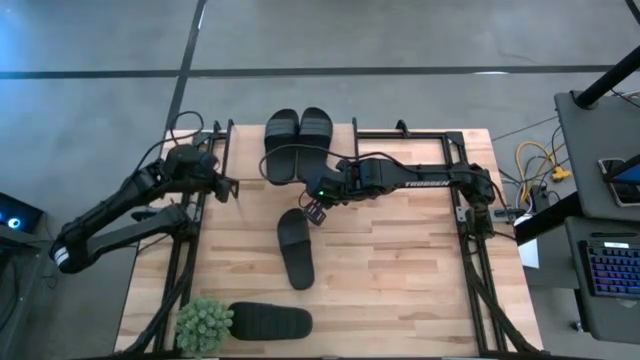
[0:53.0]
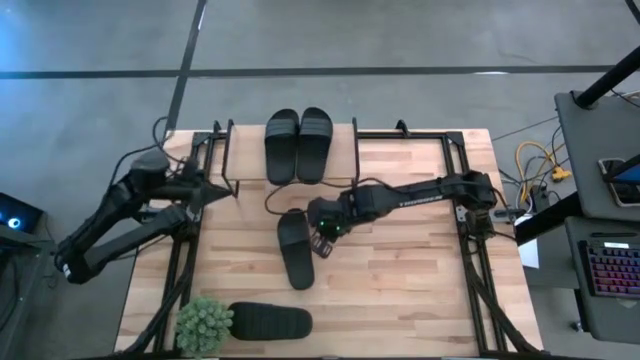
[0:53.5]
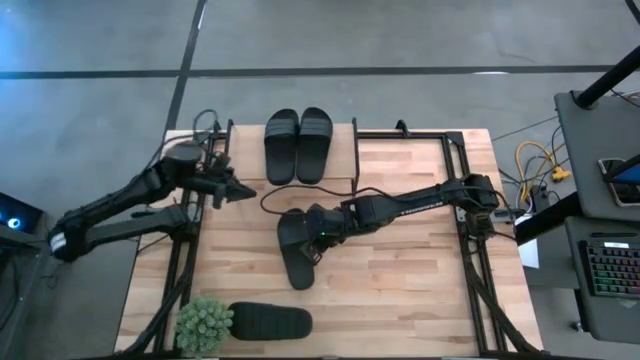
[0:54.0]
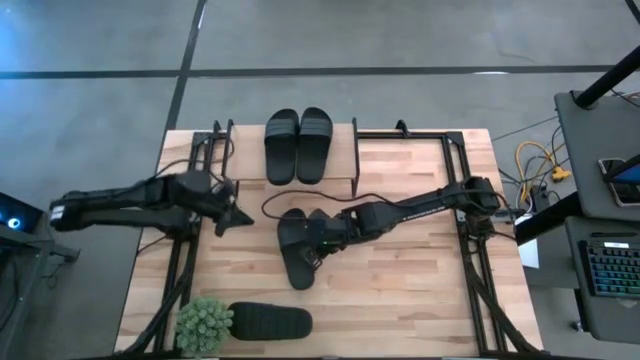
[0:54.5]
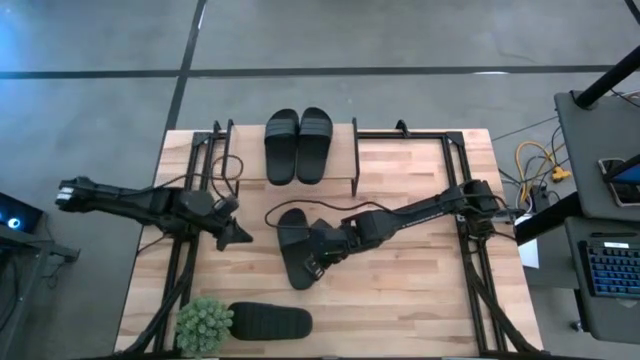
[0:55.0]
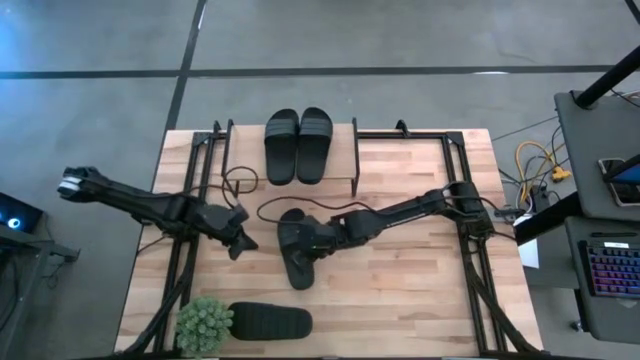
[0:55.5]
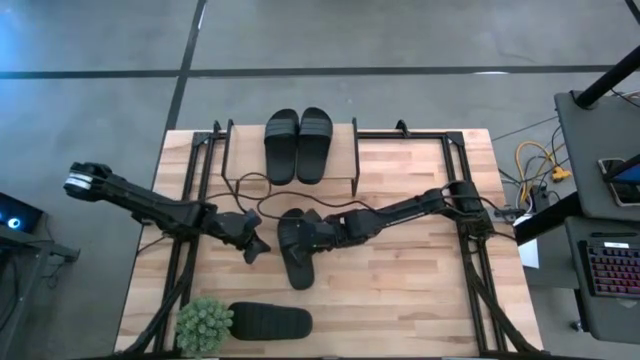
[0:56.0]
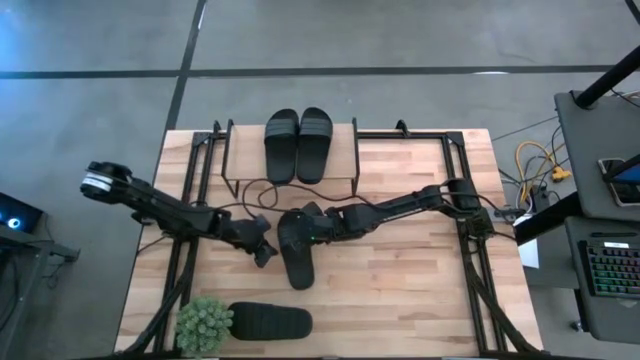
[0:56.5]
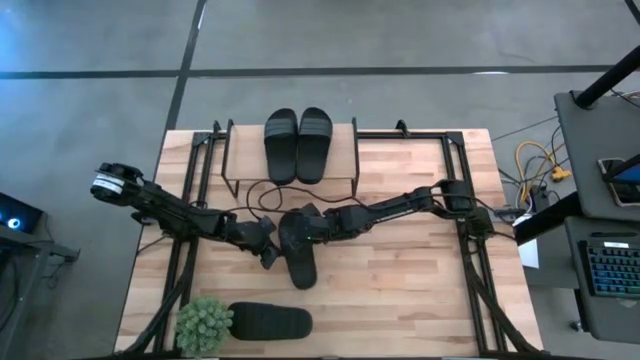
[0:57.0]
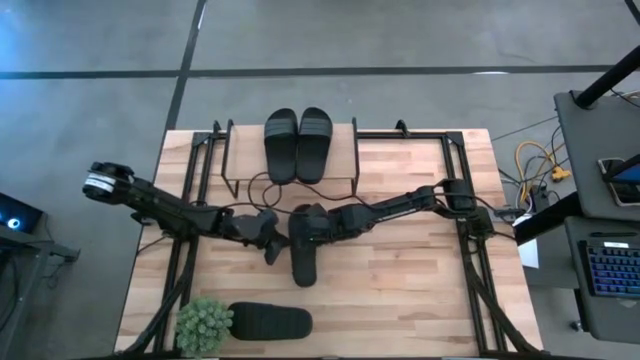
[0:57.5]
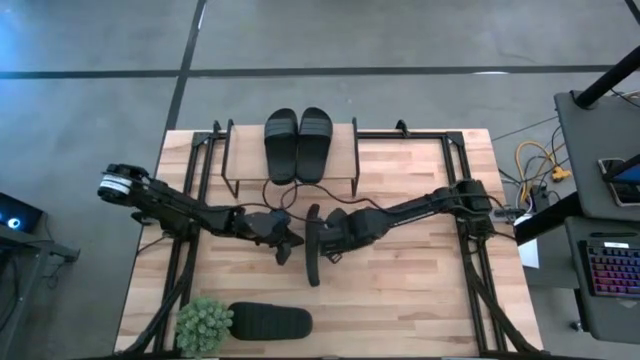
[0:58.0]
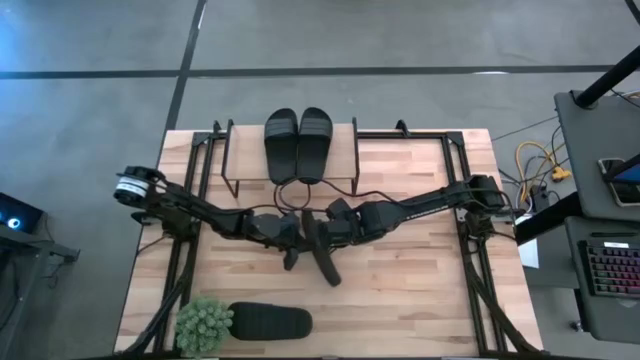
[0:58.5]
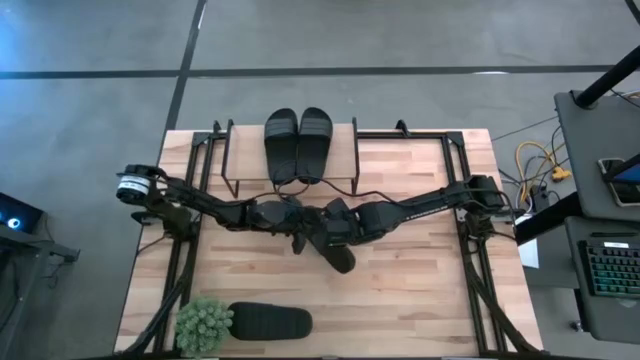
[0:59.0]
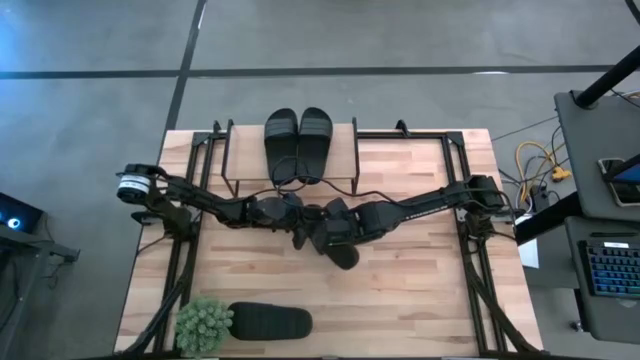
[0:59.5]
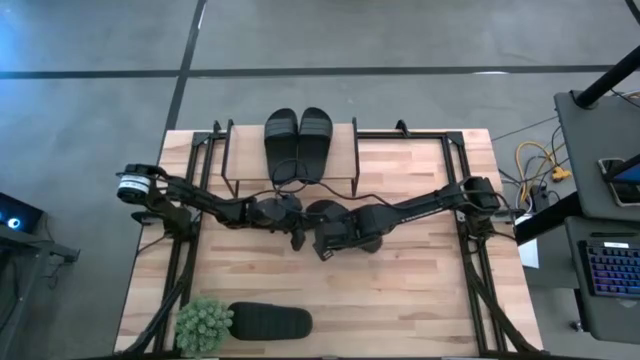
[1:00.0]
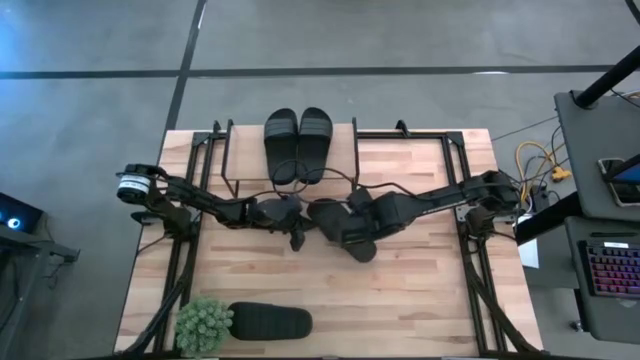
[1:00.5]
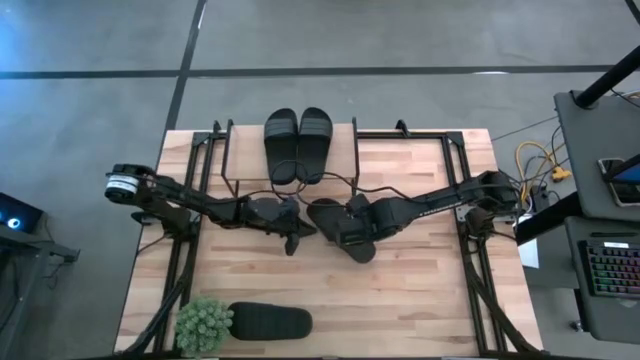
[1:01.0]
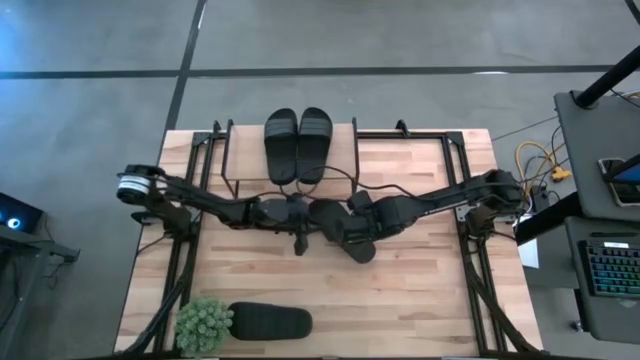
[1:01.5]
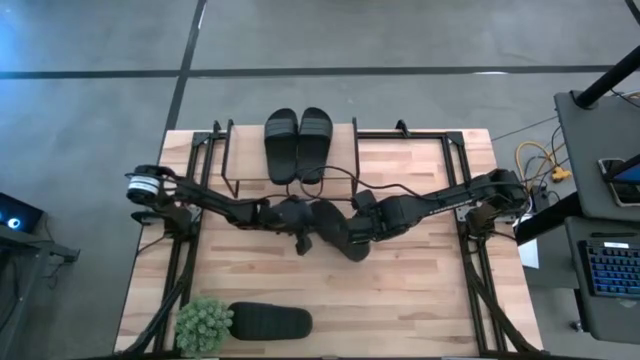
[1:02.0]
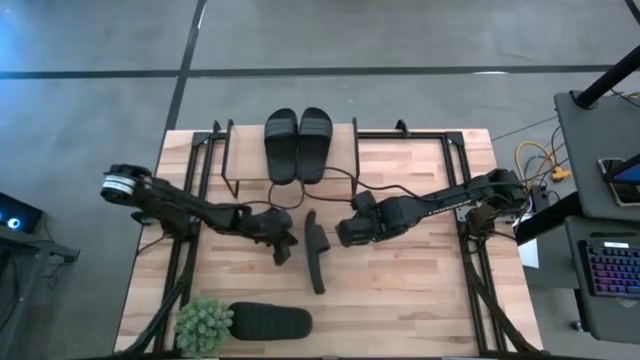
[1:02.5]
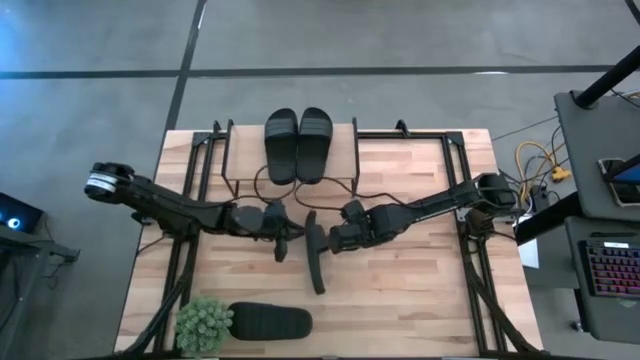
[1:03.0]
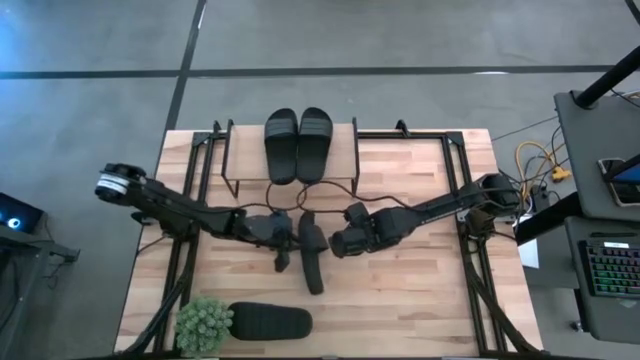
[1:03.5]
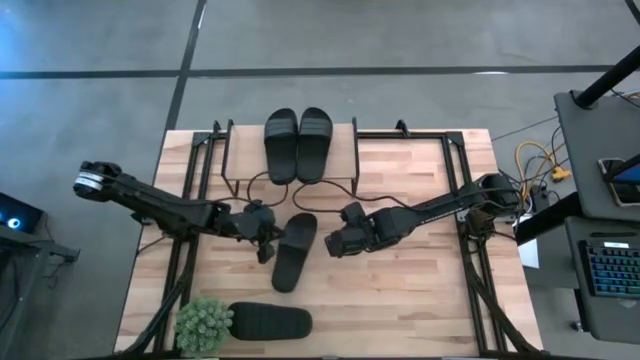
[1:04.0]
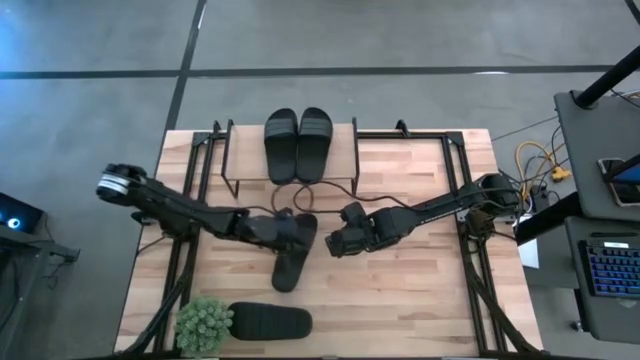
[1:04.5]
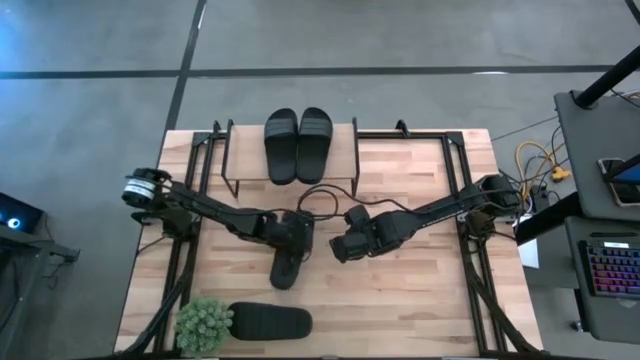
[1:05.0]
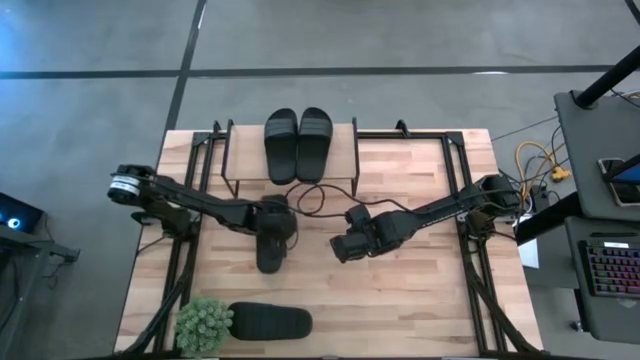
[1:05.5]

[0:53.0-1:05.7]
Task: Pick and place slides into the shelf
Adjust the black slides

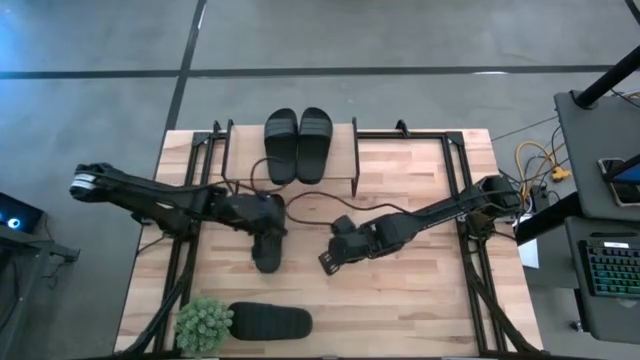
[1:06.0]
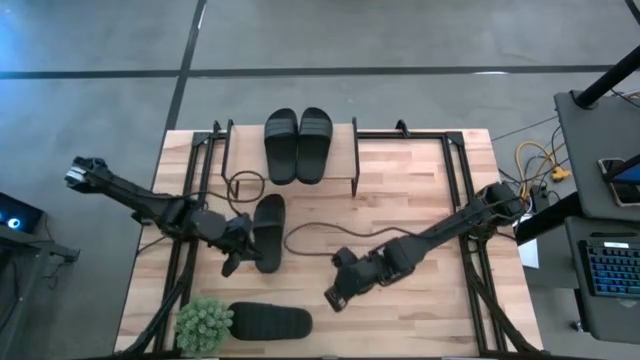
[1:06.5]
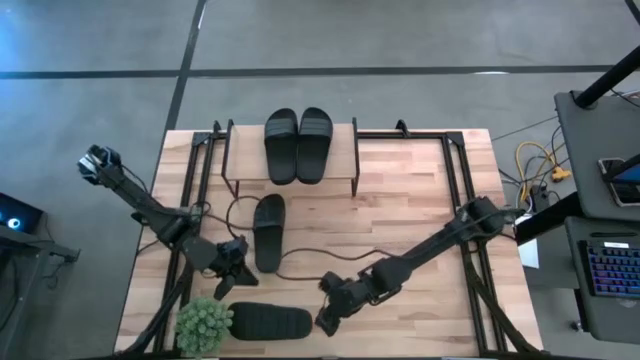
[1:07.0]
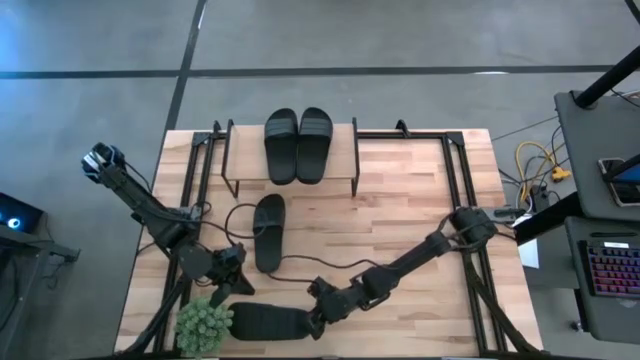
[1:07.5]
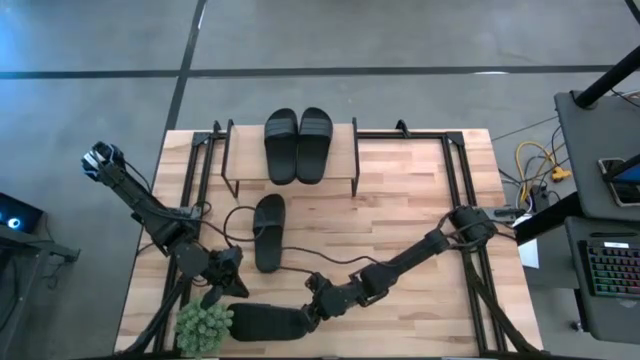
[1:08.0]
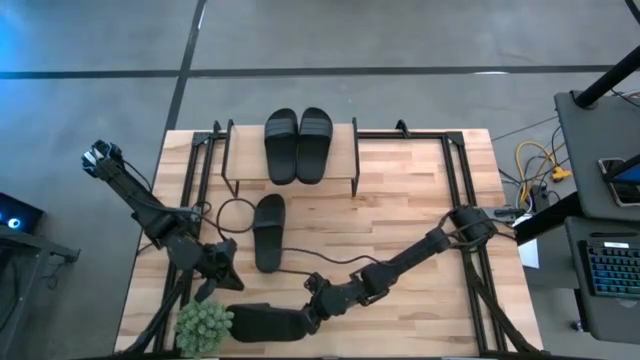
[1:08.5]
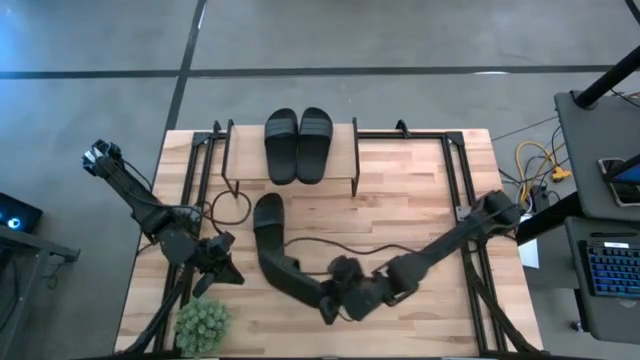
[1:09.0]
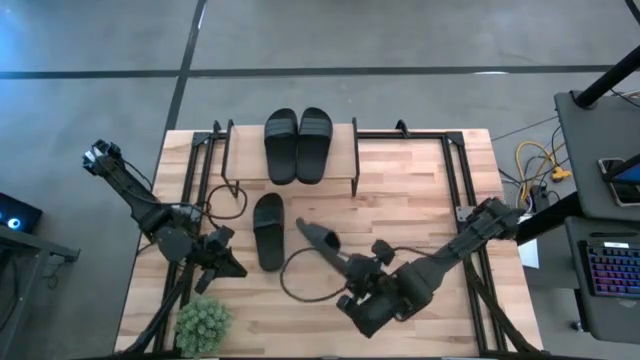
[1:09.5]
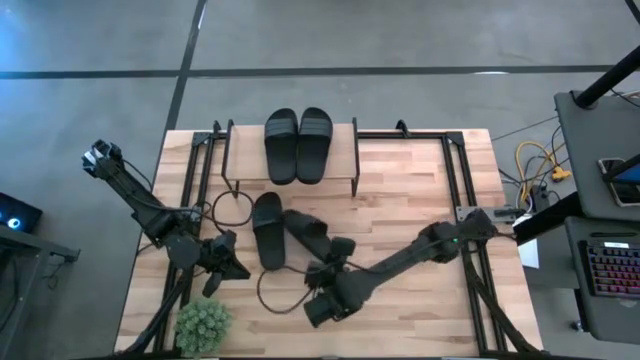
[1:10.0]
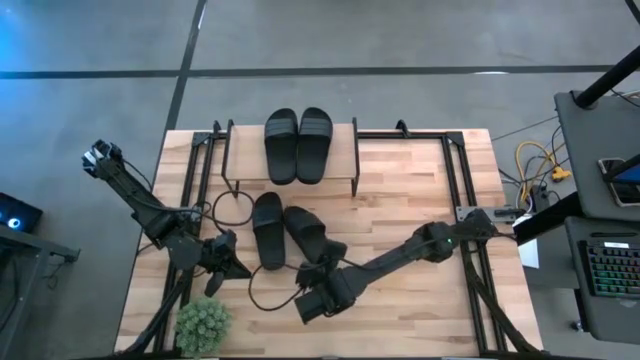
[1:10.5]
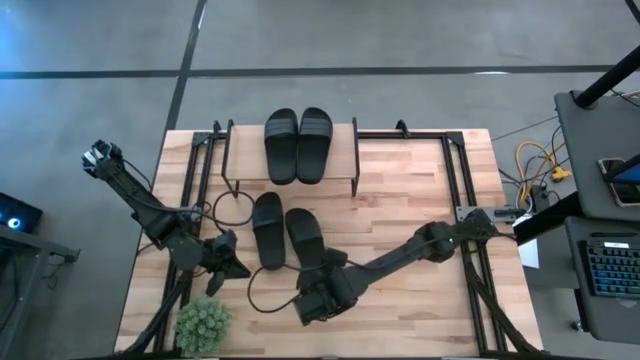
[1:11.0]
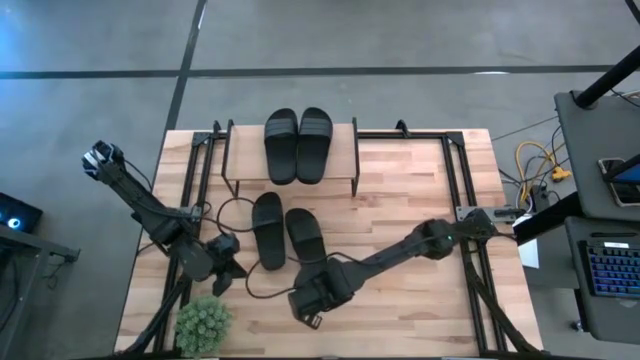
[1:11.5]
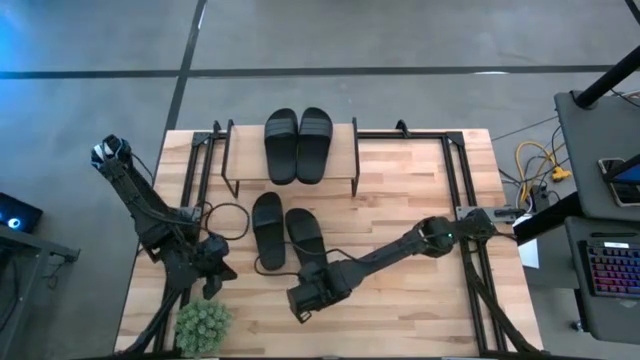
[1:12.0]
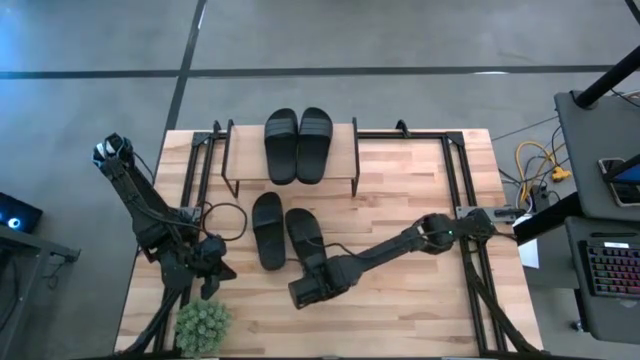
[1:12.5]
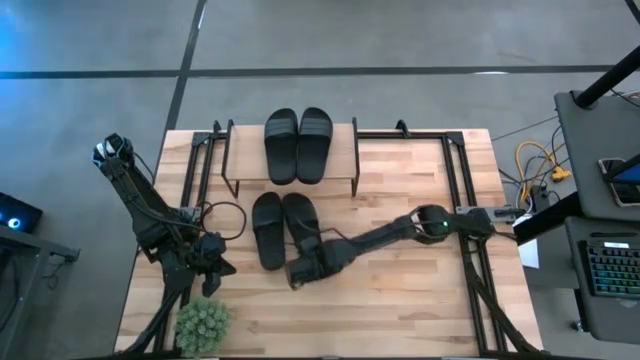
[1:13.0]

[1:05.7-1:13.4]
Put the black slide under the shelf

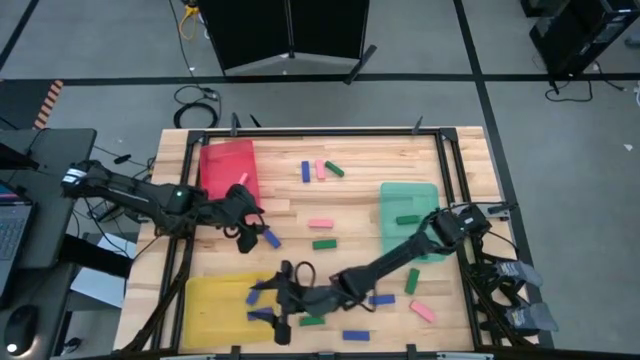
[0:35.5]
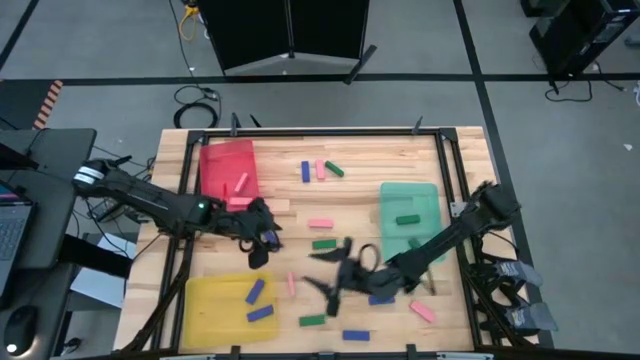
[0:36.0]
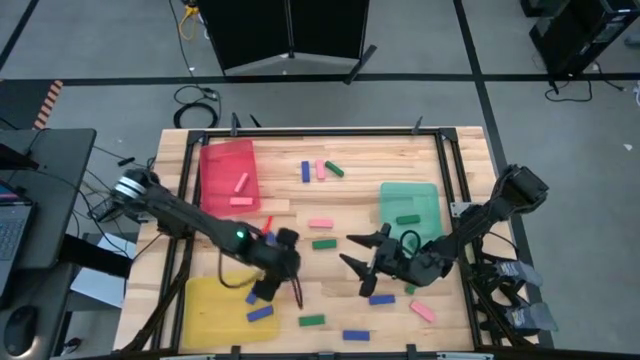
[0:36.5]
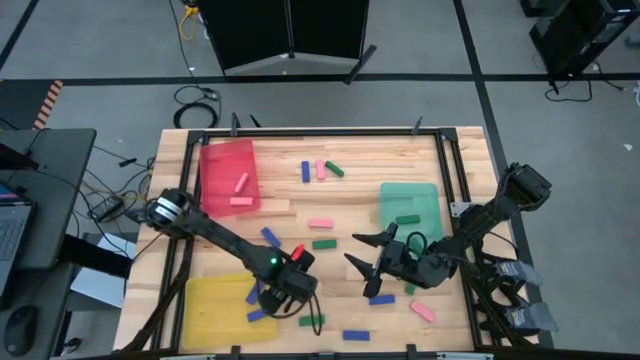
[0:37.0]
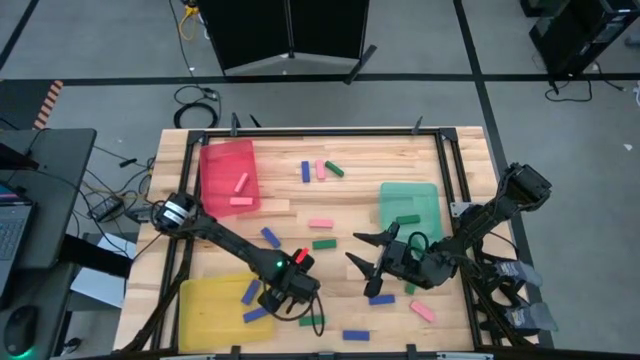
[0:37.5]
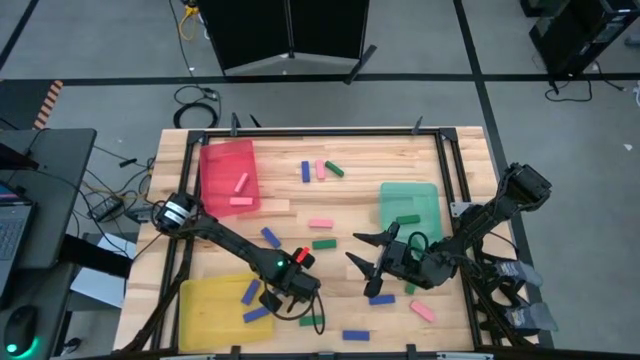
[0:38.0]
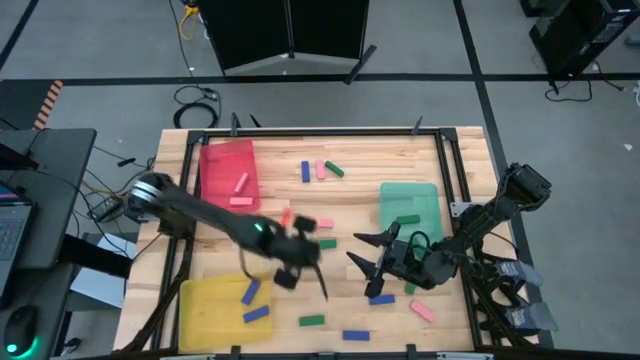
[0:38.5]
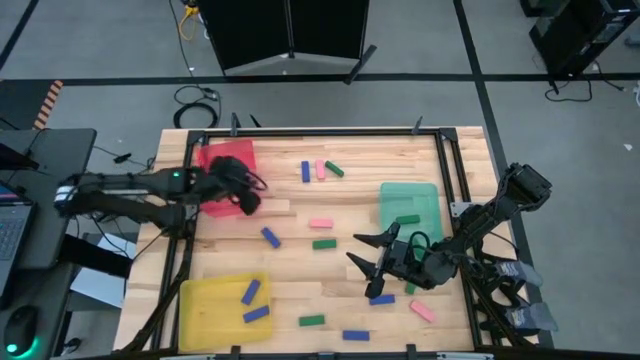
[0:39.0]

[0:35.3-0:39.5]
Task: Sort blocks
Put the pink block into the red bin
